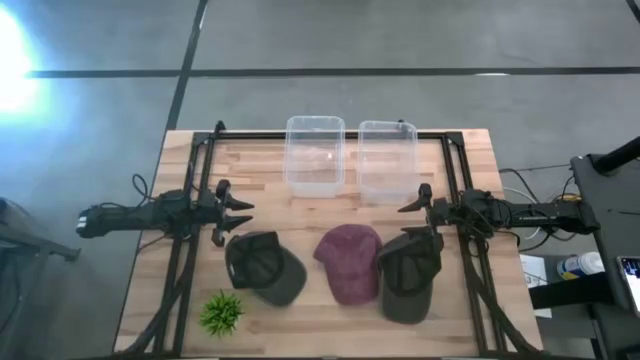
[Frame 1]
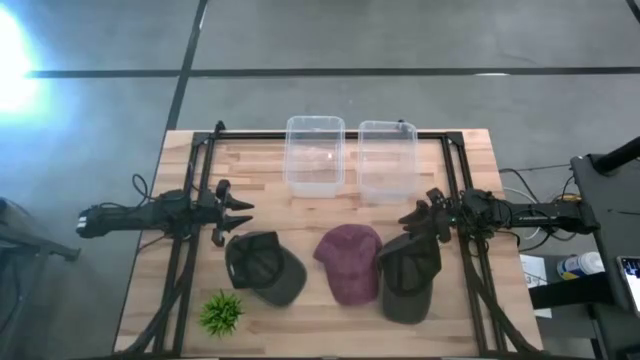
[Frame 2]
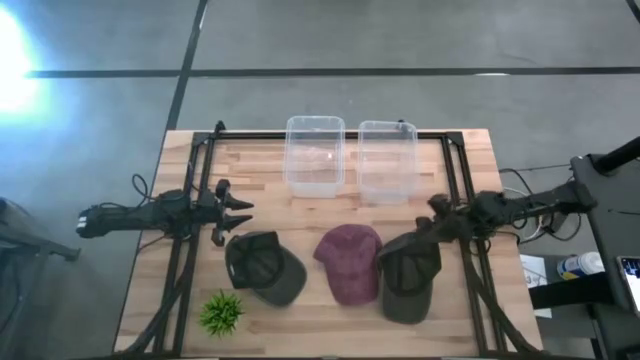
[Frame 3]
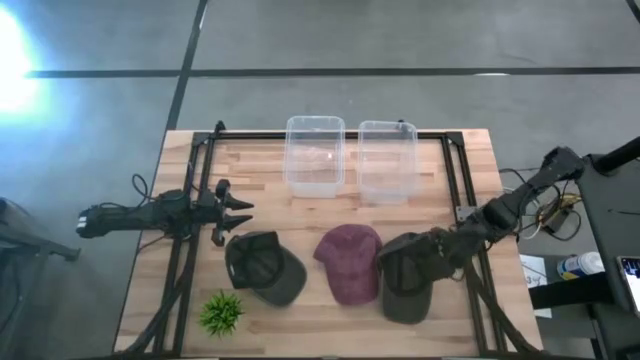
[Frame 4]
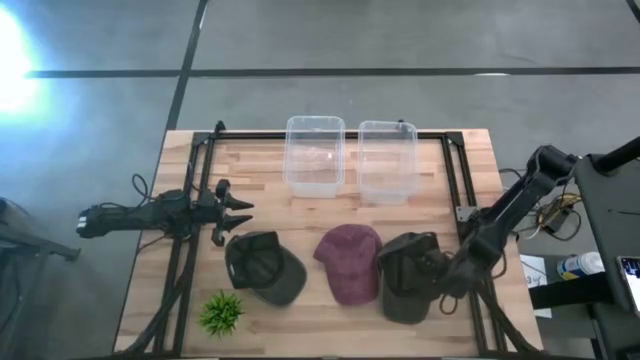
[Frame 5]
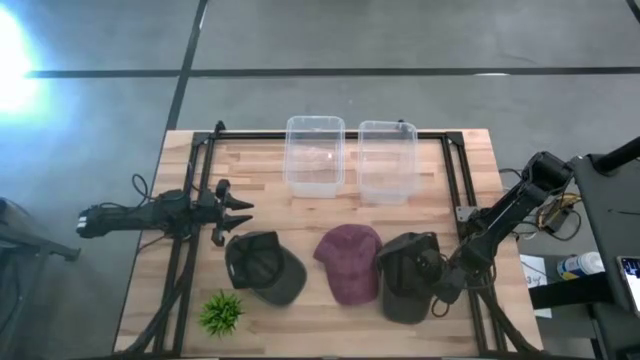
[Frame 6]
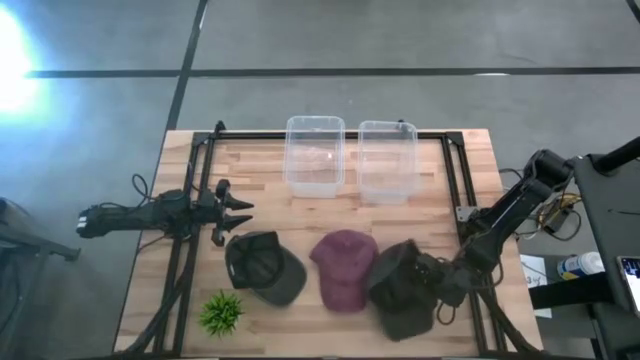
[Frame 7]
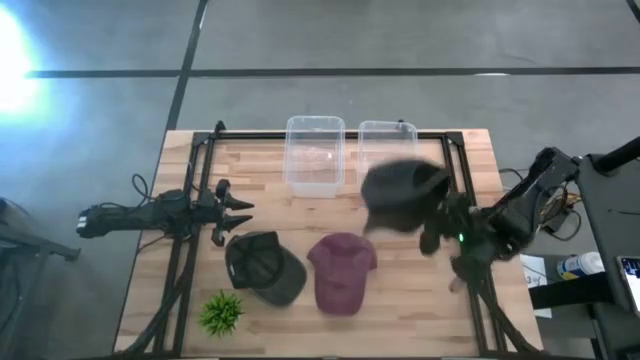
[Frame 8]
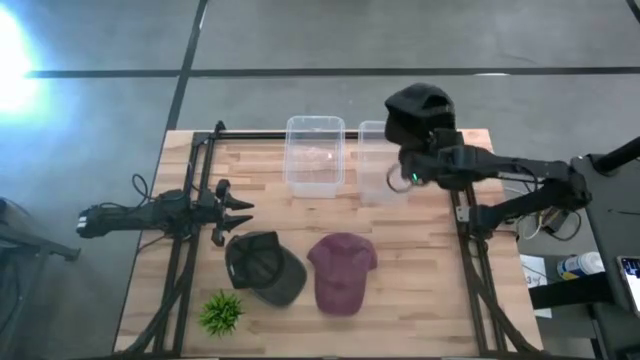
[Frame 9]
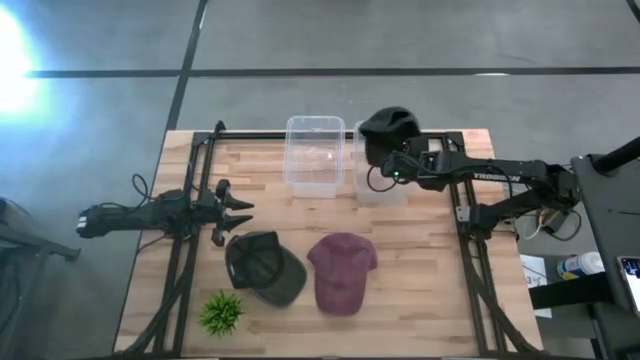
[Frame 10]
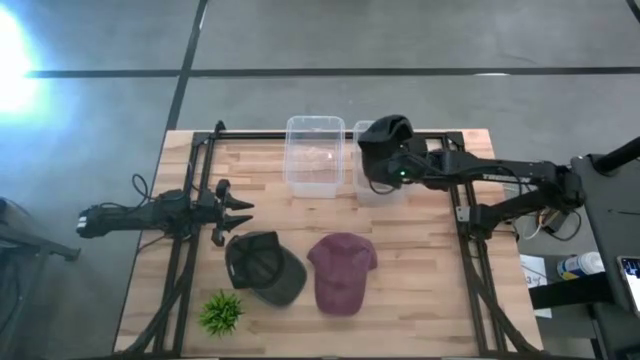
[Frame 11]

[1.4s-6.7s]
Task: Pick & Place hat
Put the right black cap into the right transparent bin

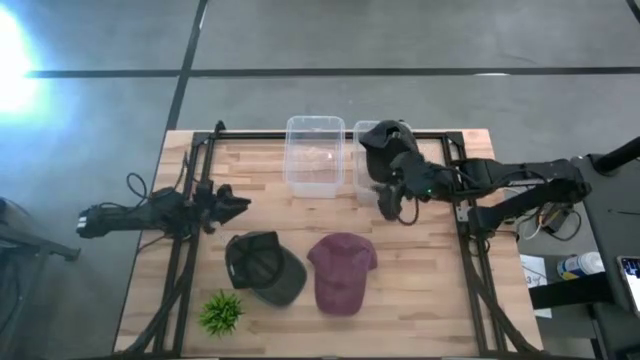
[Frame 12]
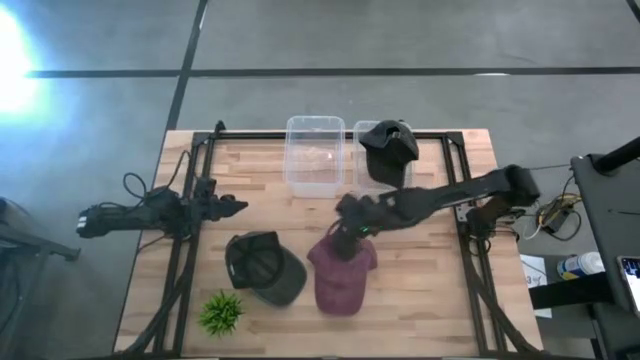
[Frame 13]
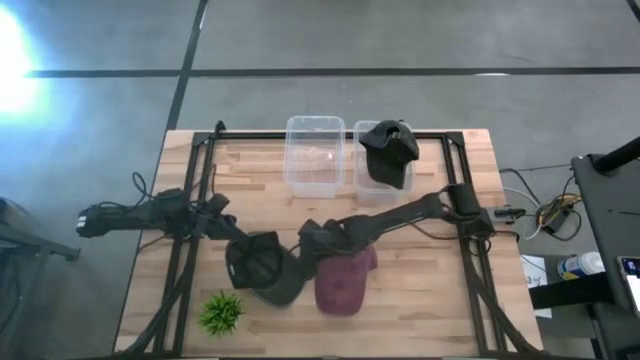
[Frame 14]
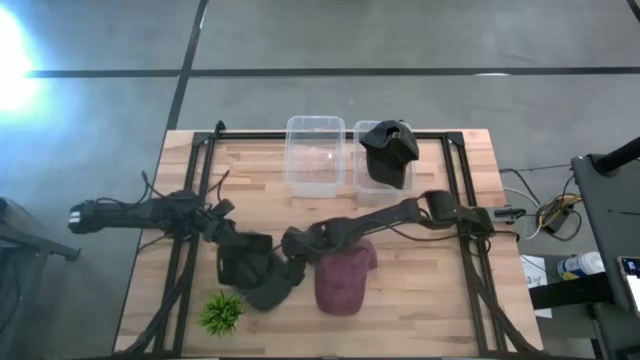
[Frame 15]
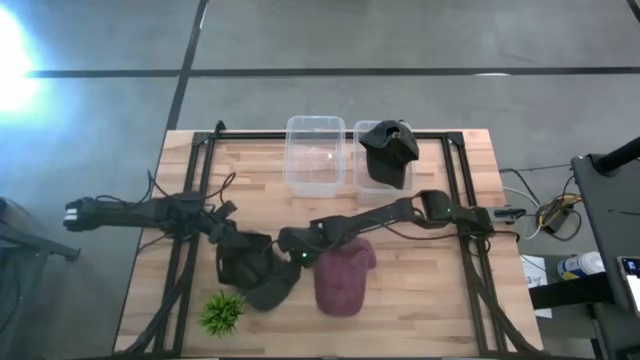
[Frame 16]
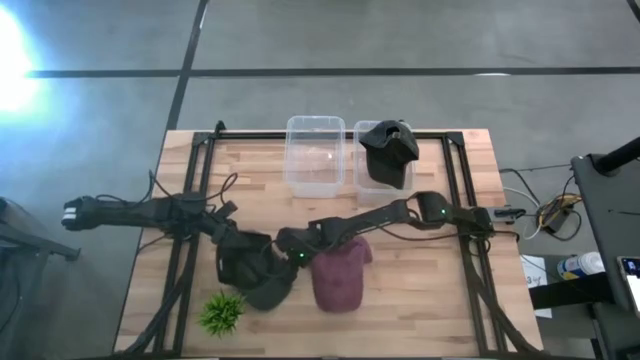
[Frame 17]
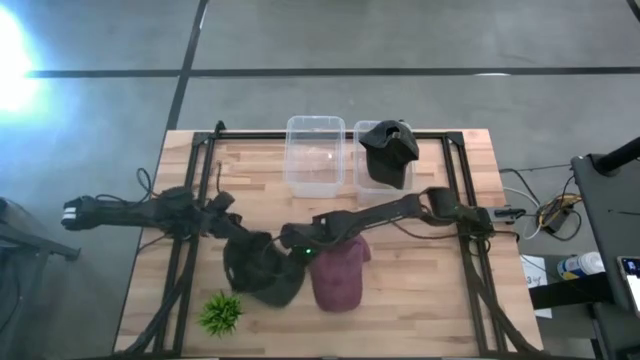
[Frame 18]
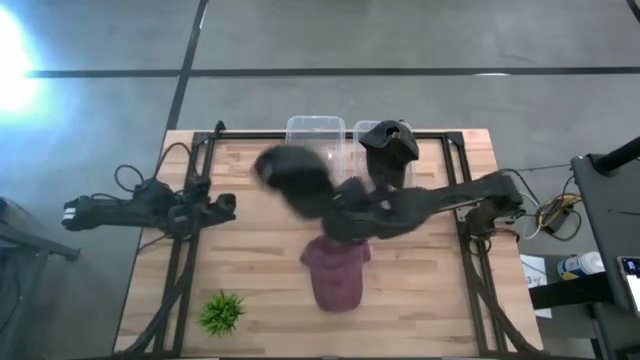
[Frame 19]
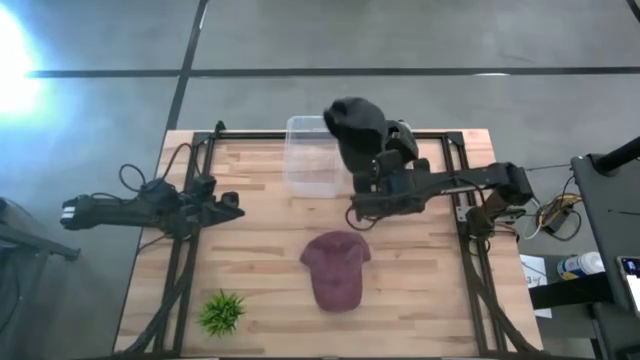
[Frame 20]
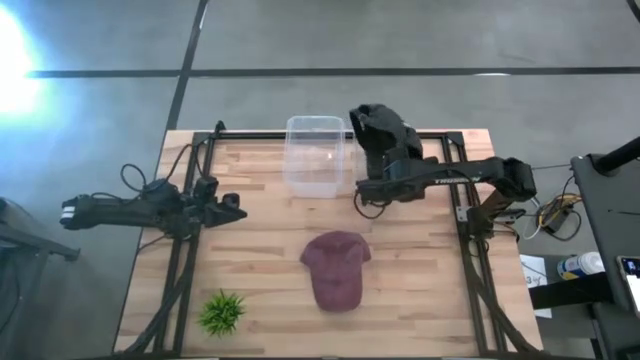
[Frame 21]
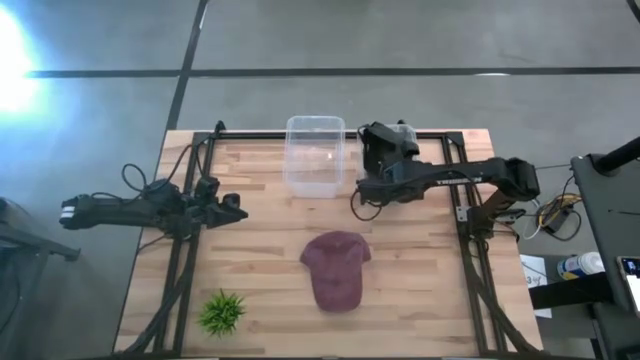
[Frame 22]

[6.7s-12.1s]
Put the black cap into the right transparent bin

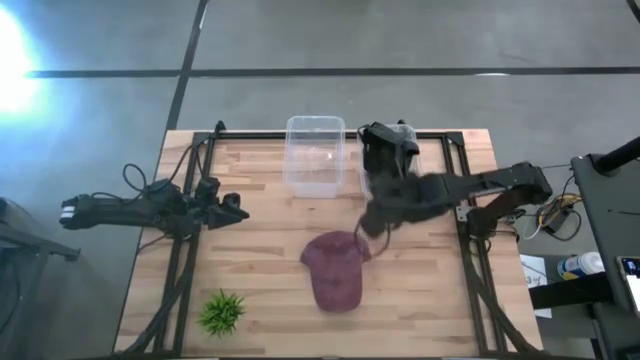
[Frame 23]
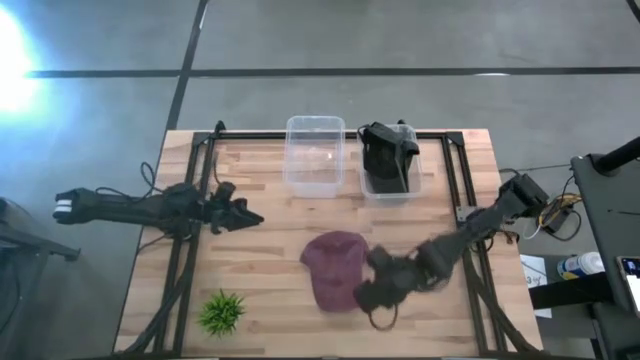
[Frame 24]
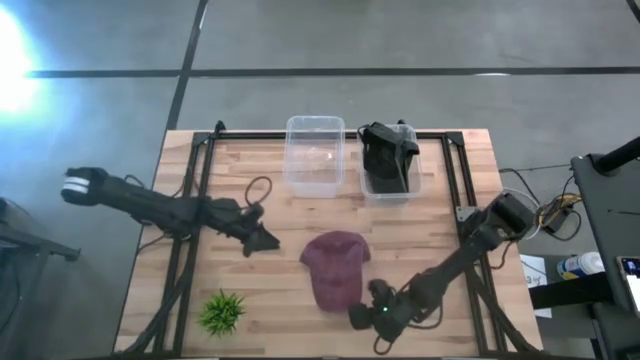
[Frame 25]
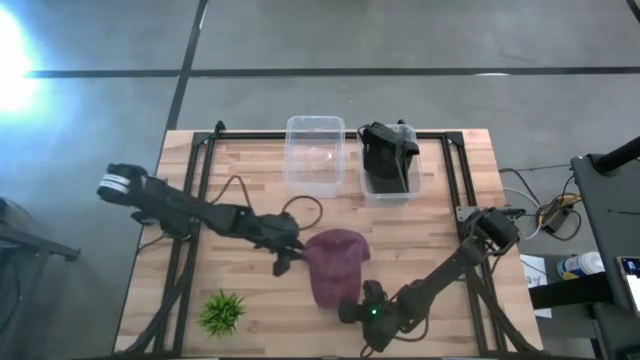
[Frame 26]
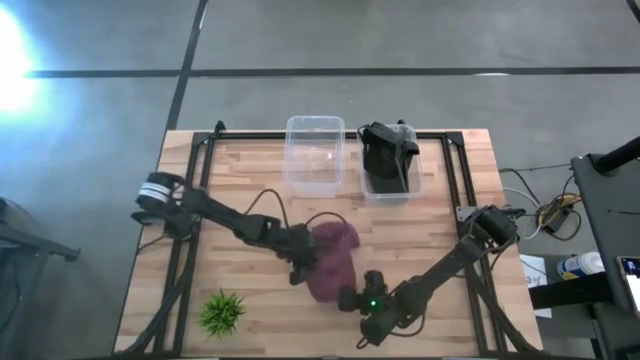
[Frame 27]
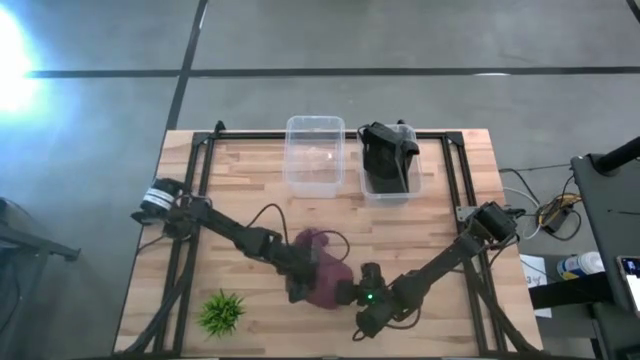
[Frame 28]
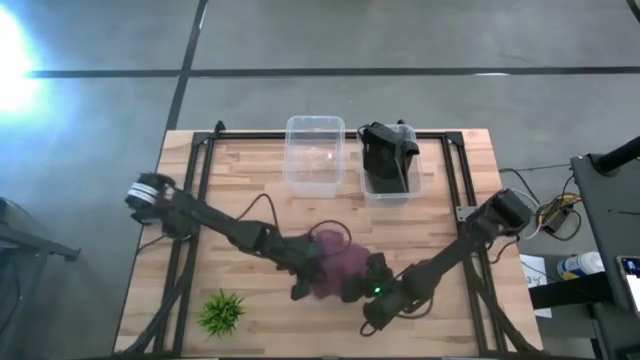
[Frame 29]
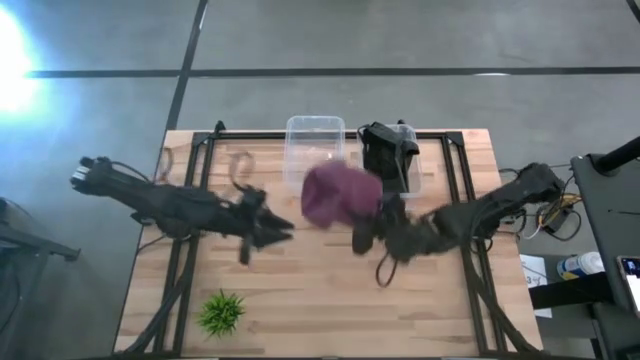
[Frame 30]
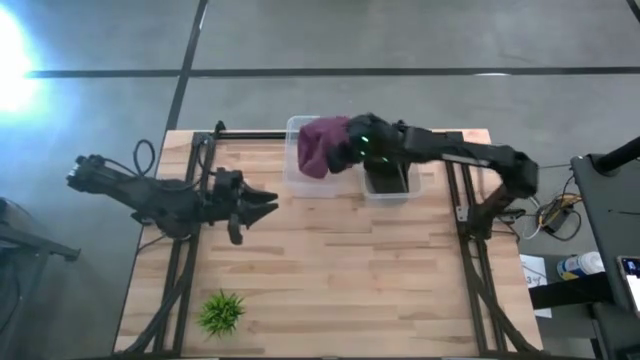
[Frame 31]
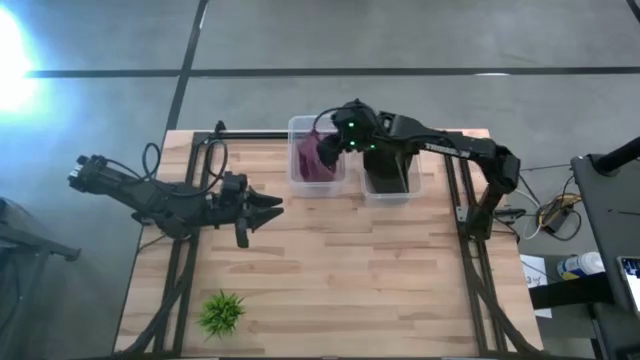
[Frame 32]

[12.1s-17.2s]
Put the red cap into the left transparent bin

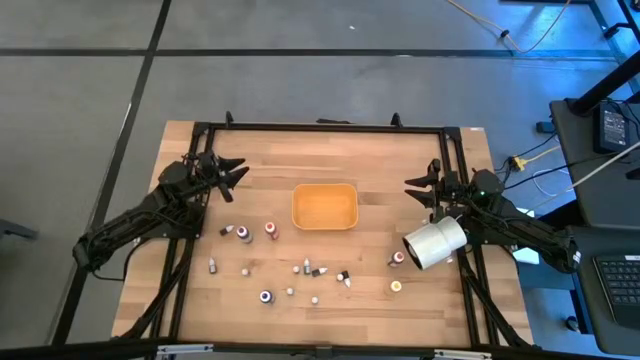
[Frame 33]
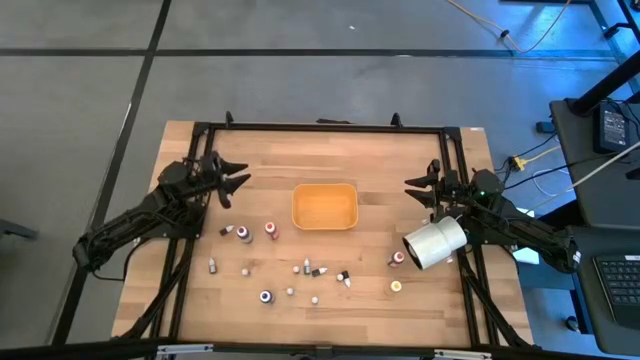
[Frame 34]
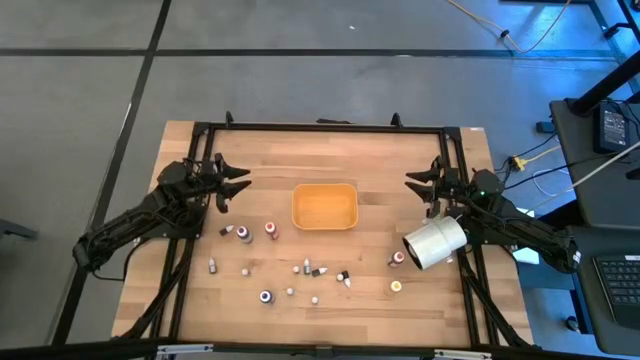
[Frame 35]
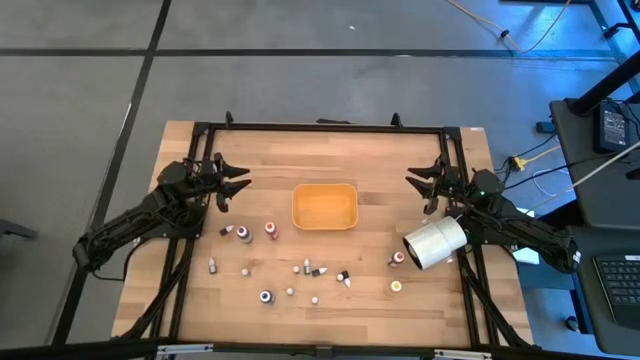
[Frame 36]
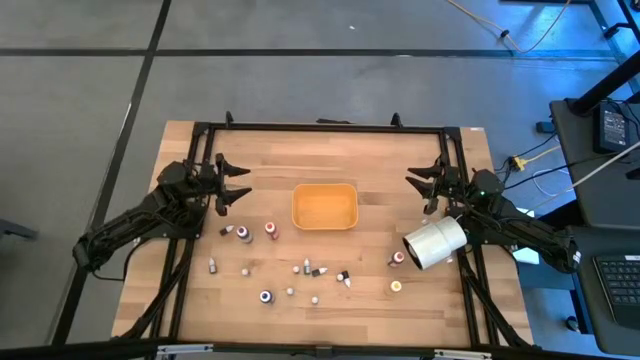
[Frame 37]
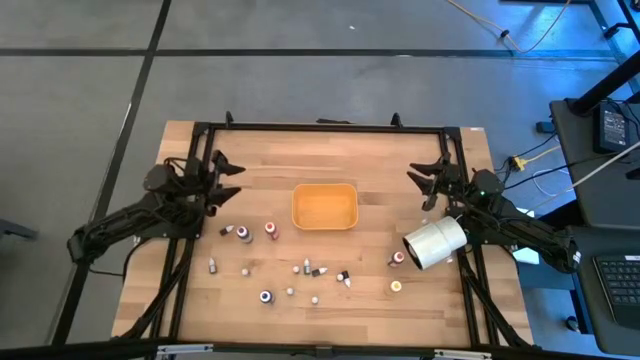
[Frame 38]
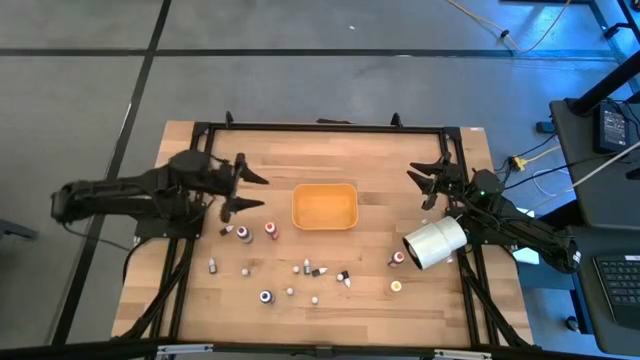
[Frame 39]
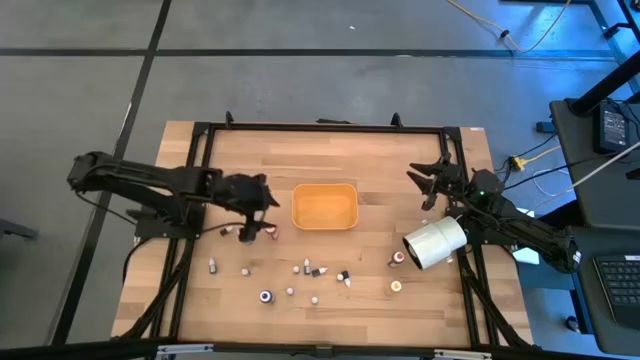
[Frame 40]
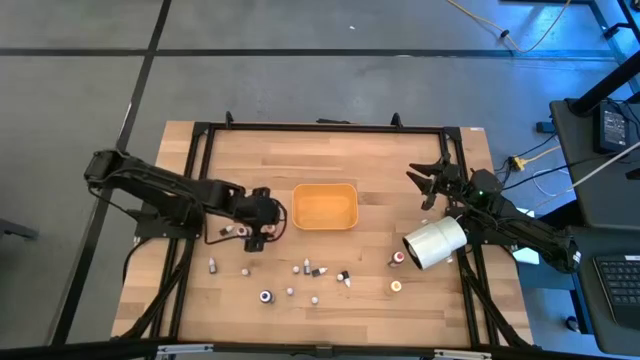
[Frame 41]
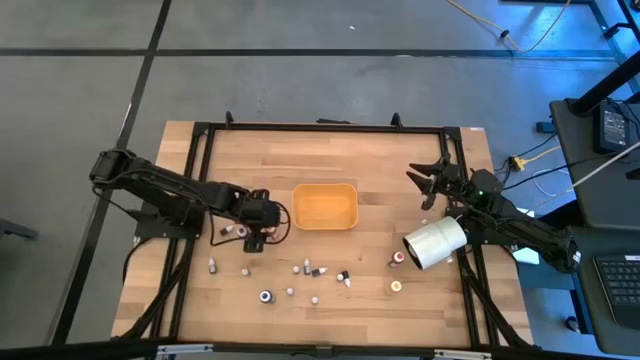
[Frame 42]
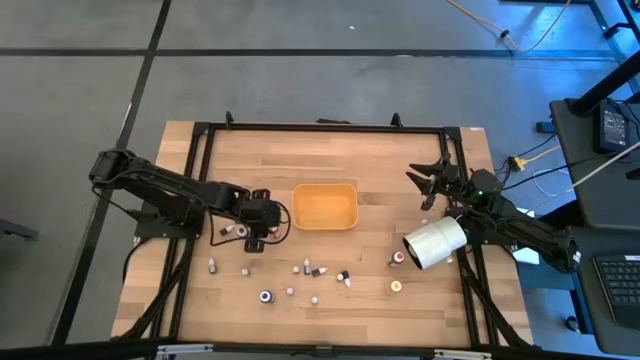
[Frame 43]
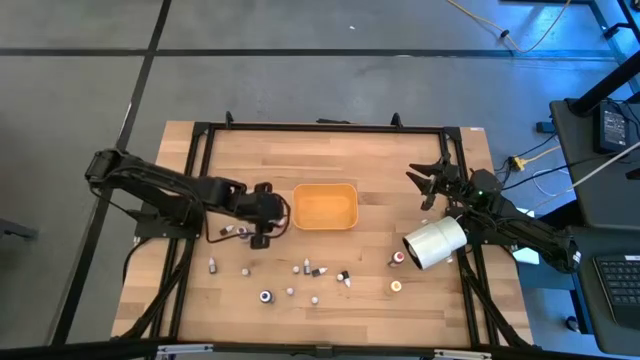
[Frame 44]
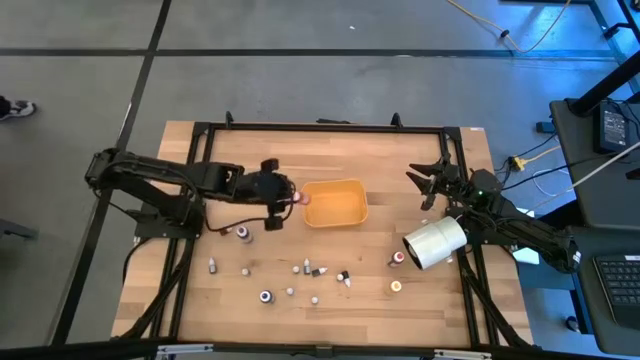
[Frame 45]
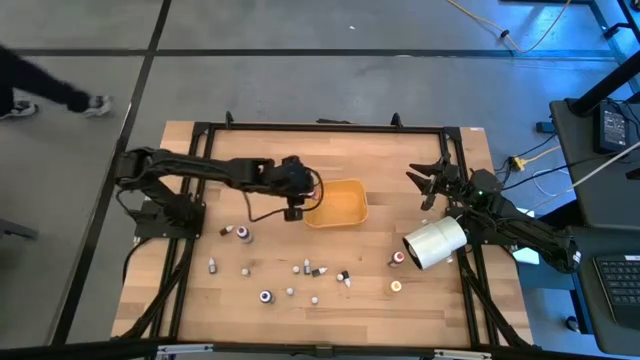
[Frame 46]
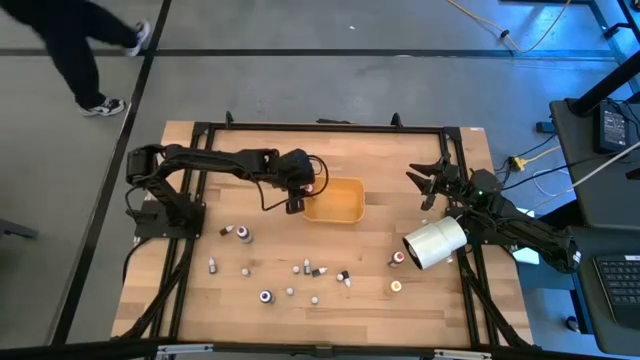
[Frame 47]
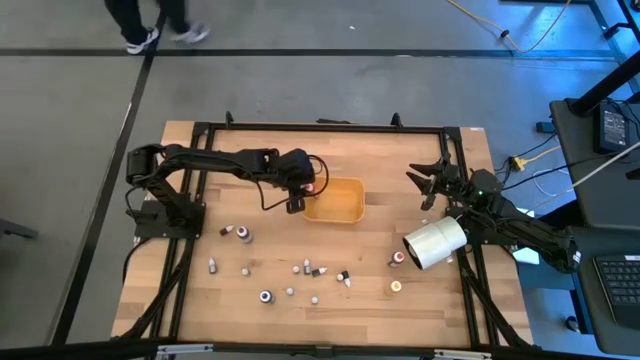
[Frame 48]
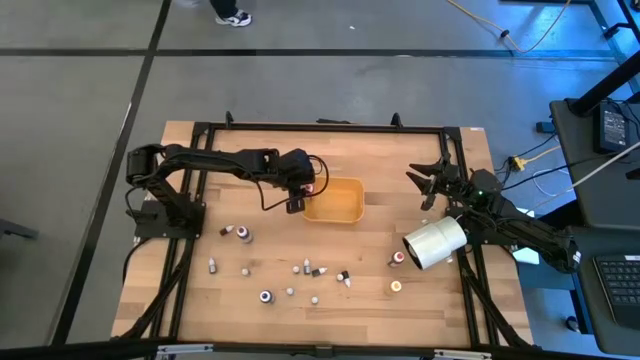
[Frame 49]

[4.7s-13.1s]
Task: Pick & Place food coloring
Put the big orange food coloring bottle into the yellow bin
